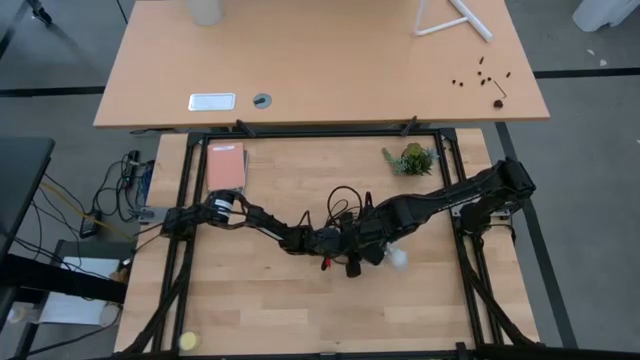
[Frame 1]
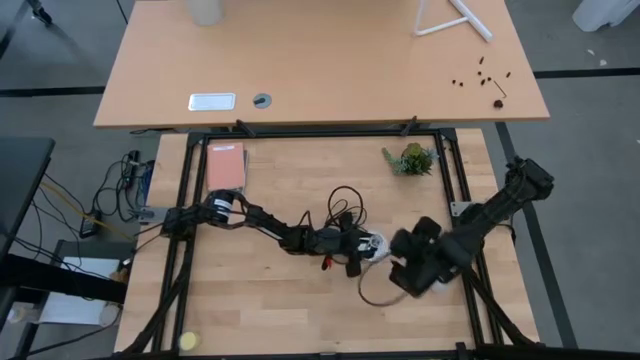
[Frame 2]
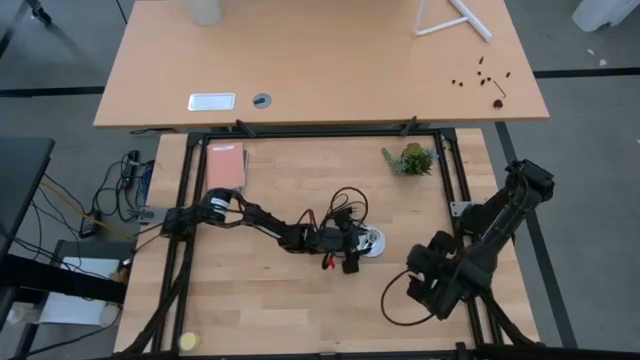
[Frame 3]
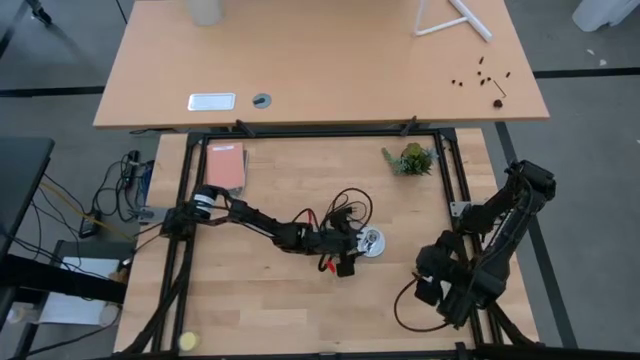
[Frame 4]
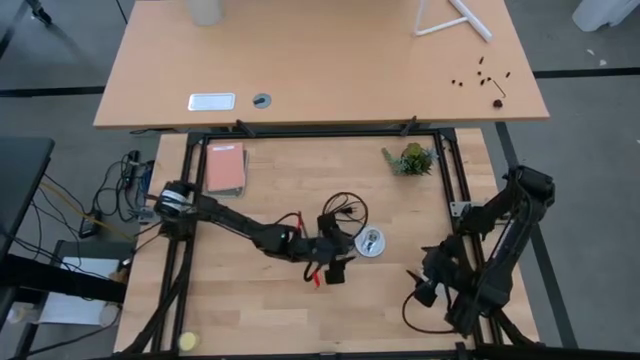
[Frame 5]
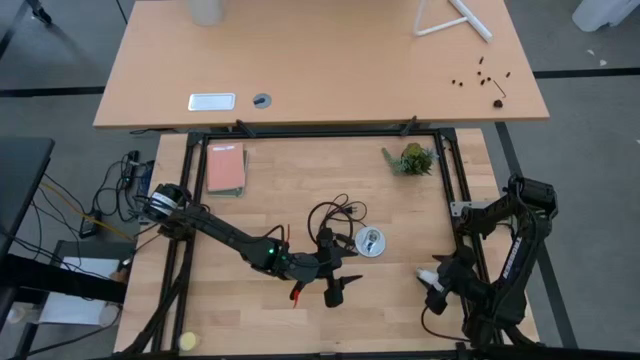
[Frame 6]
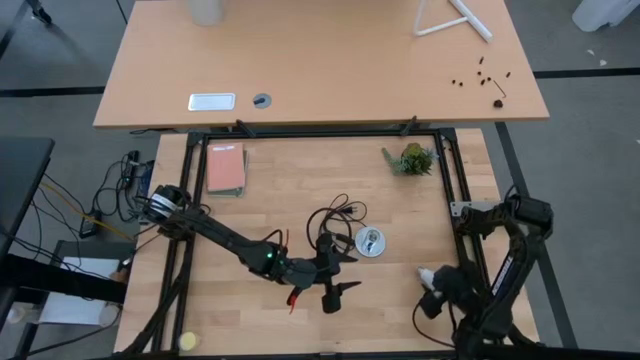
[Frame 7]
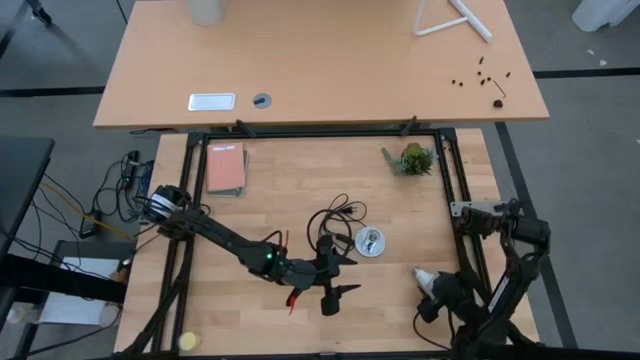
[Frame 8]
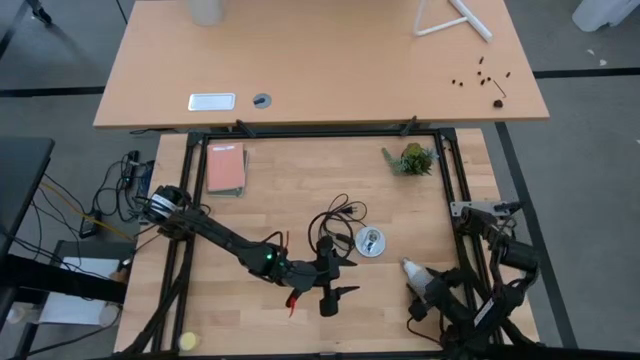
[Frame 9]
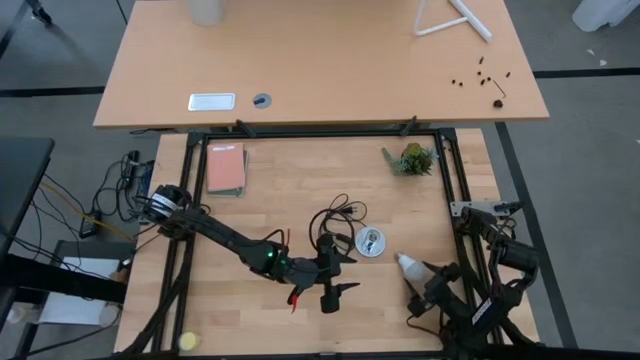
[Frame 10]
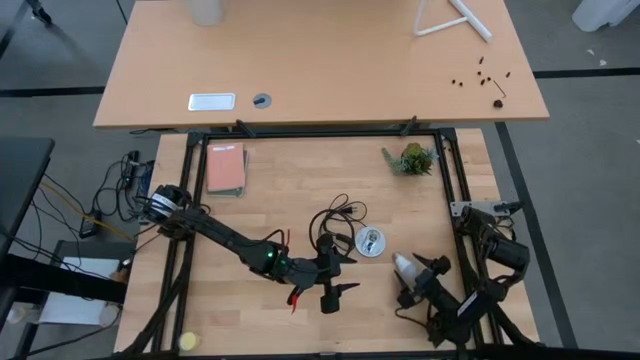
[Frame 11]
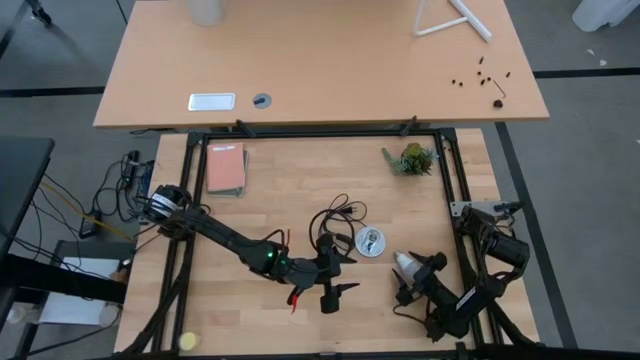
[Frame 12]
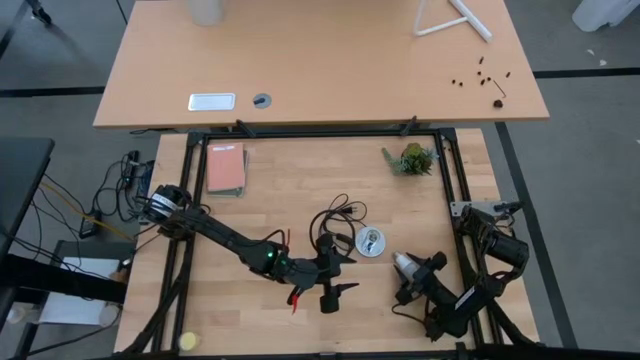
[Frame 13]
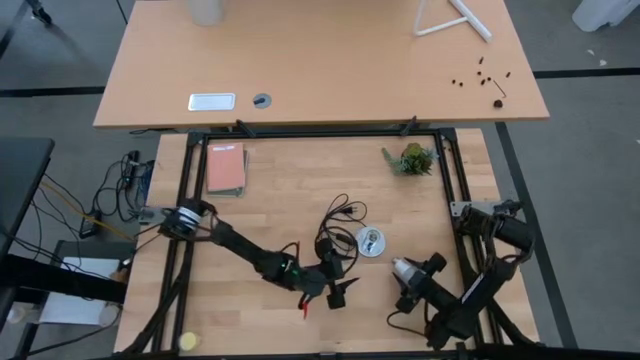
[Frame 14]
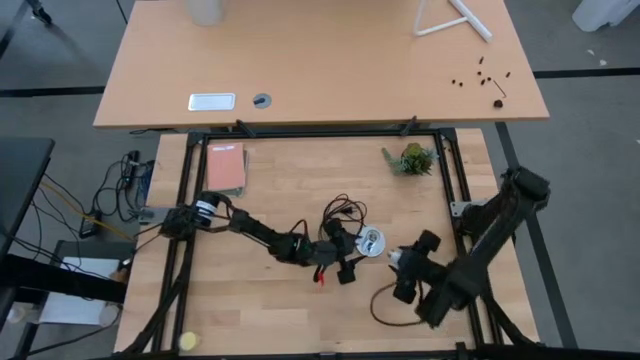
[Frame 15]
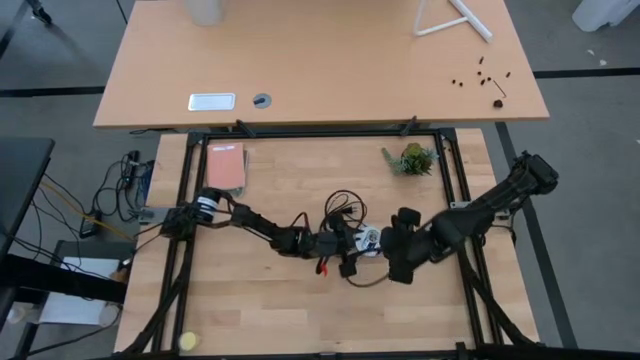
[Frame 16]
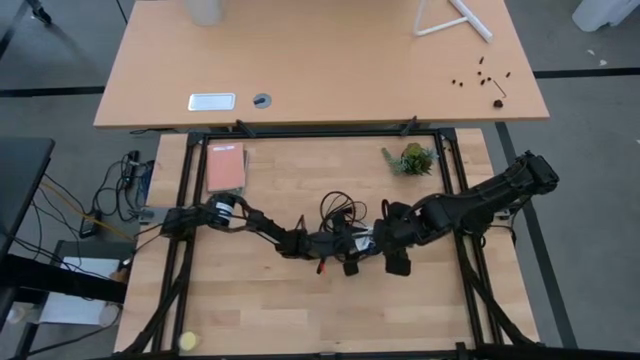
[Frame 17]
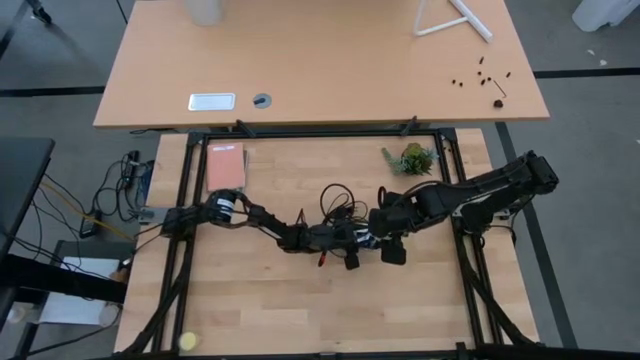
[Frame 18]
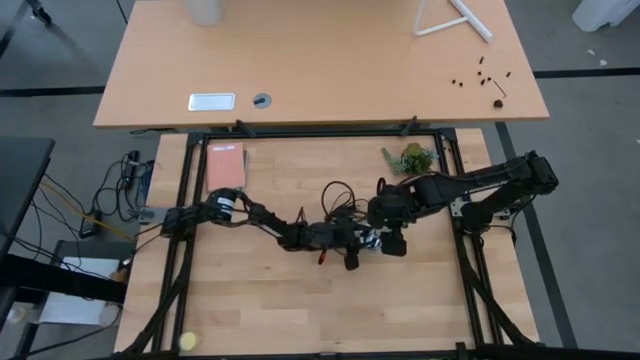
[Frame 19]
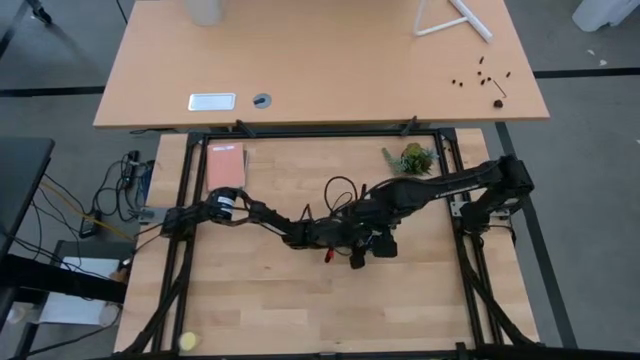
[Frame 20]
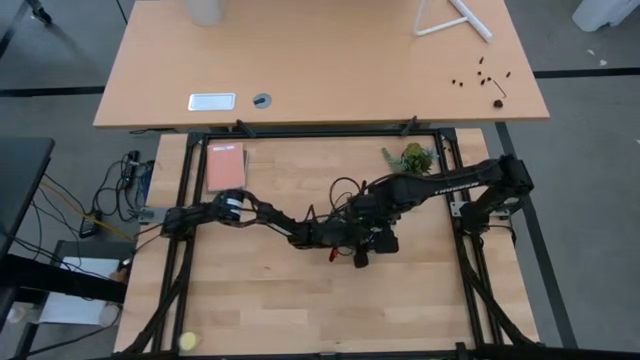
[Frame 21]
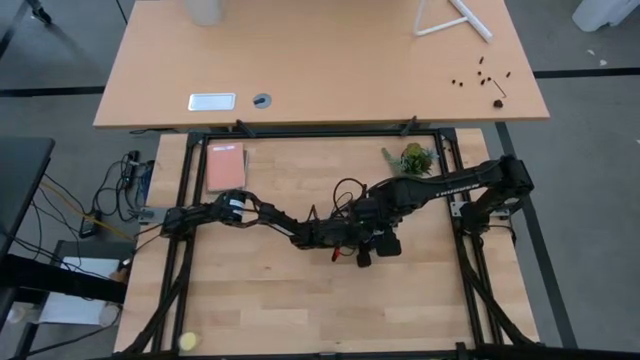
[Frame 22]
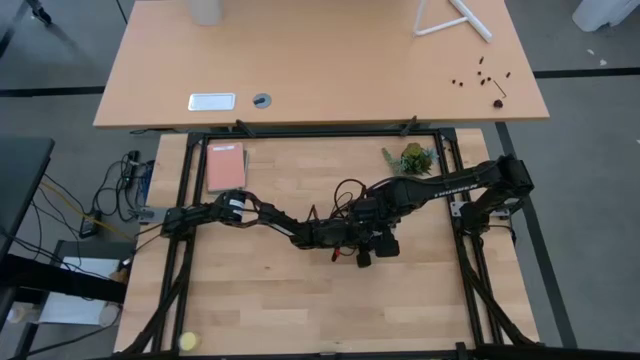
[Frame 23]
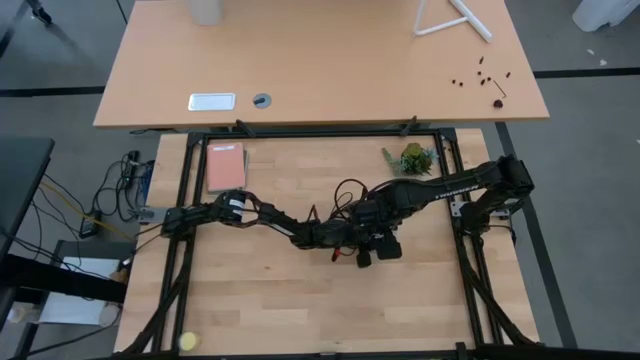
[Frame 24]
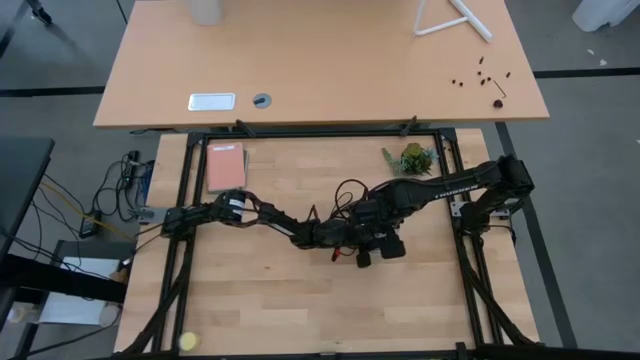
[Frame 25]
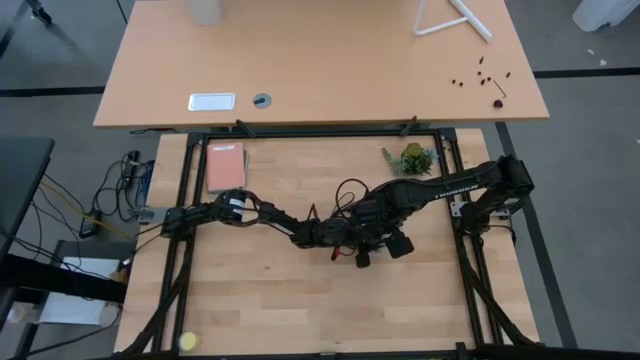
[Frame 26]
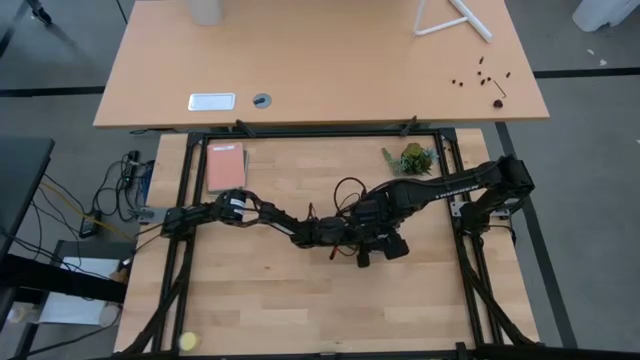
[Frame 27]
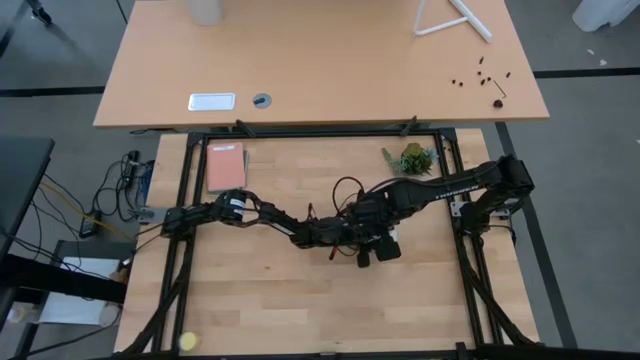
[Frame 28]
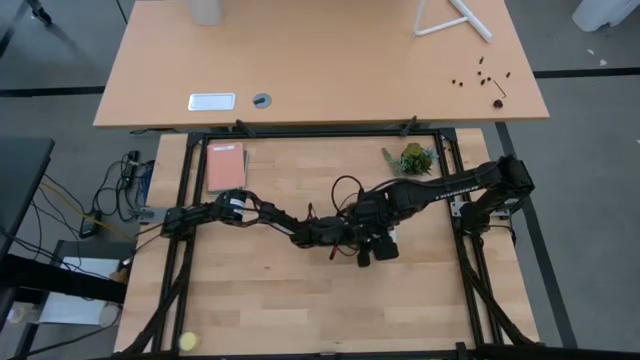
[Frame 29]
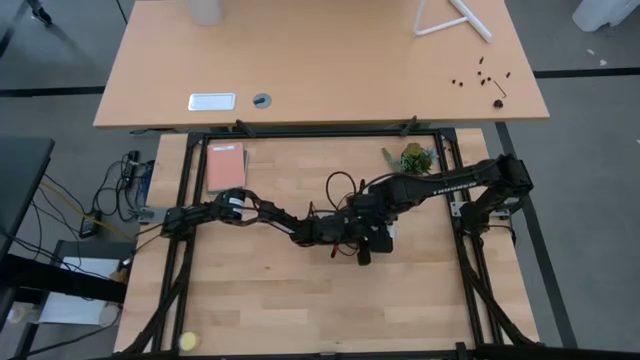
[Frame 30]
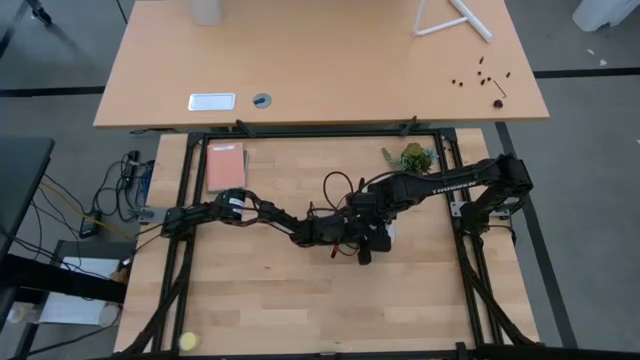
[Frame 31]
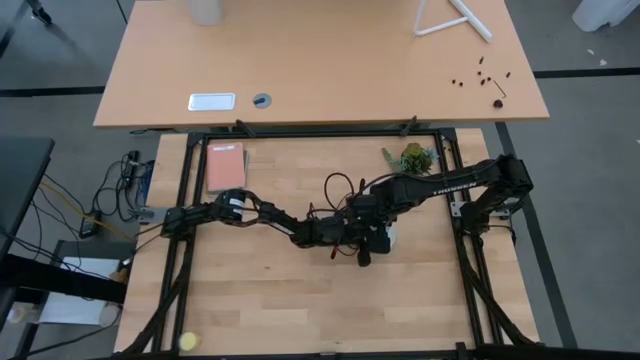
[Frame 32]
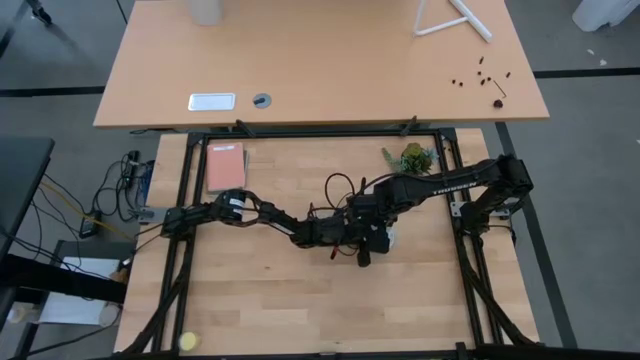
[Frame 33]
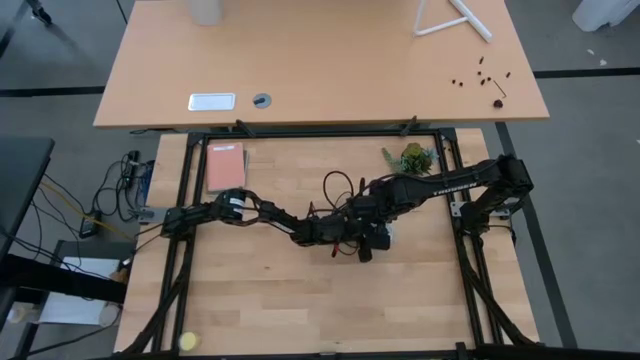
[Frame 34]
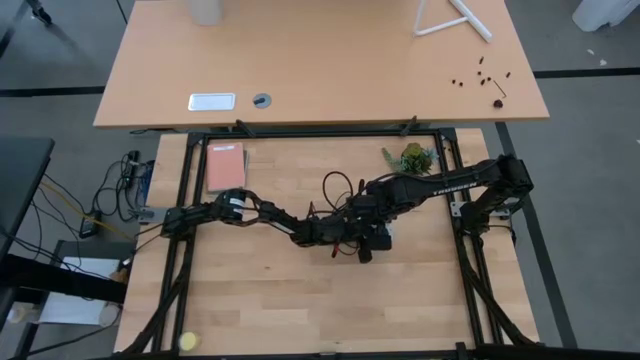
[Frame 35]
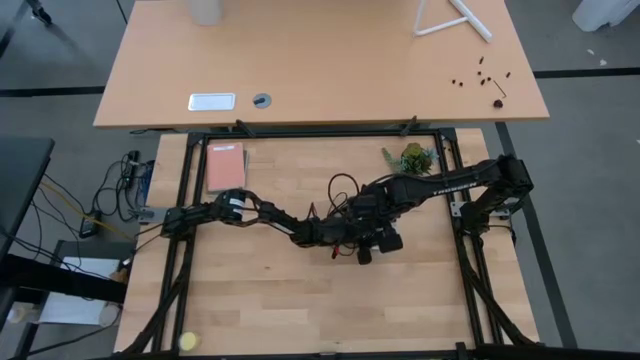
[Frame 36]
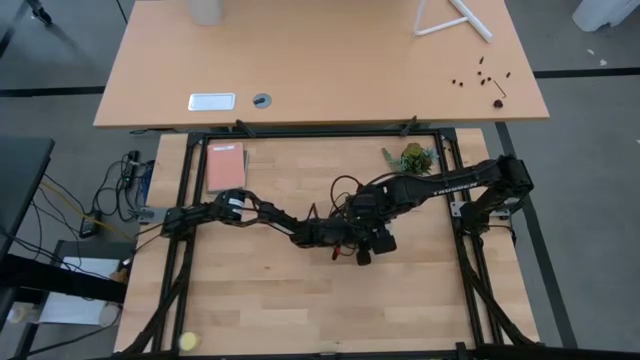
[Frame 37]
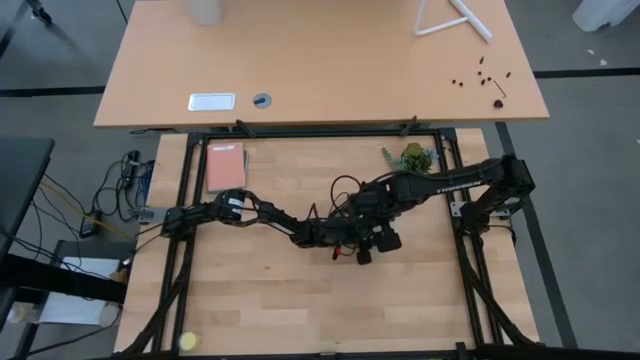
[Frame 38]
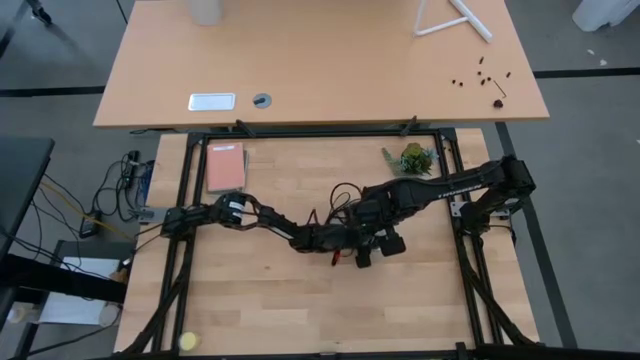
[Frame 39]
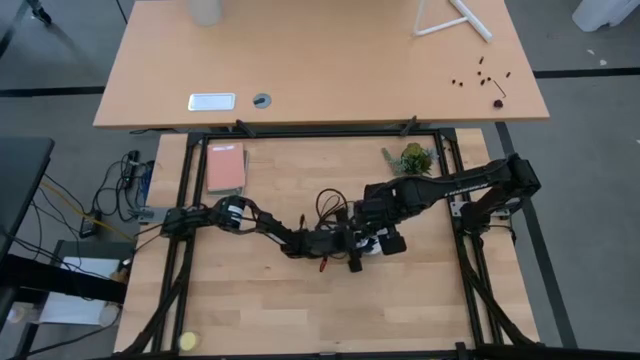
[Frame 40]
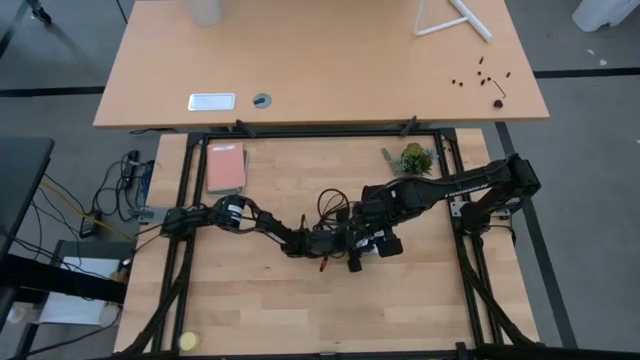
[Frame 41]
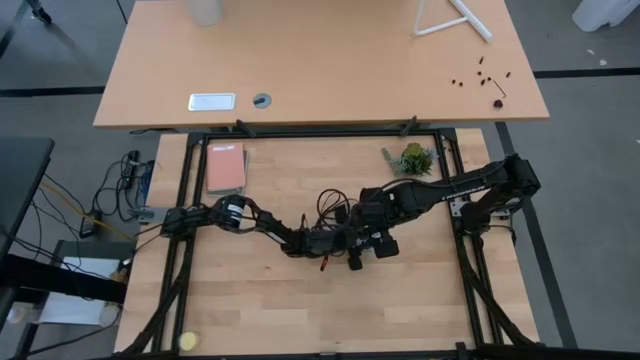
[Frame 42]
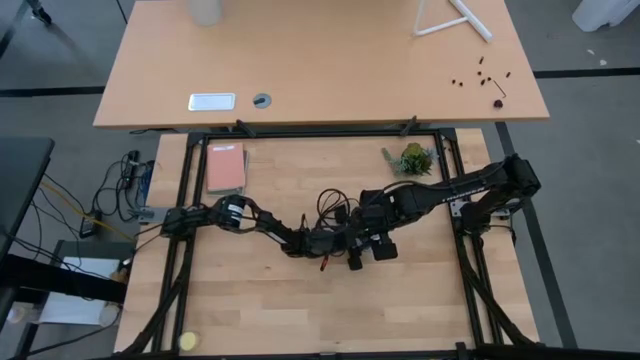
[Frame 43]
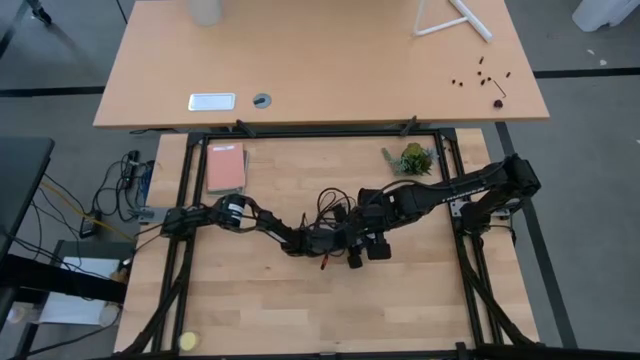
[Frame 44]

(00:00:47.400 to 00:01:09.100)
Task: Screw lightbulb
Insert the lightbulb into the lamp
